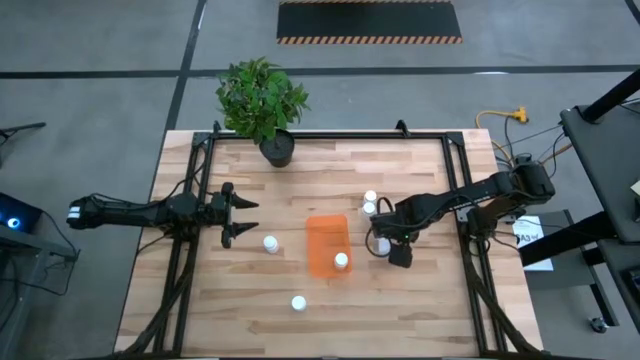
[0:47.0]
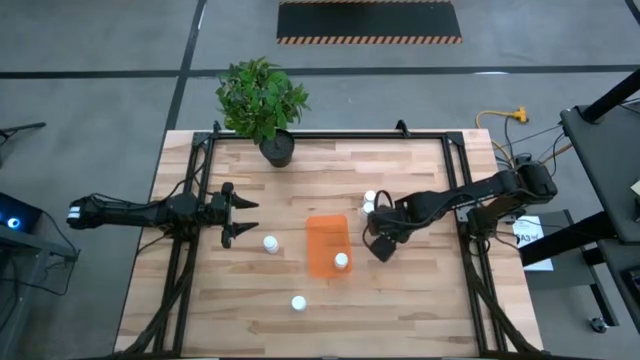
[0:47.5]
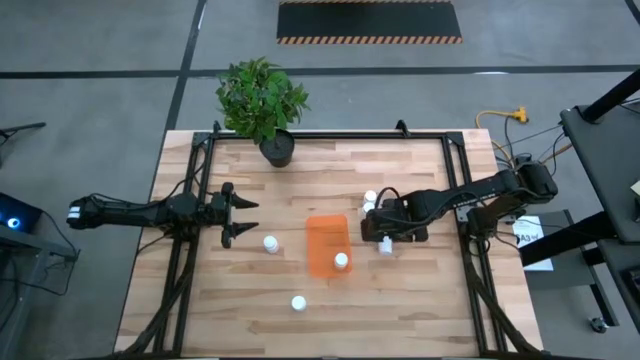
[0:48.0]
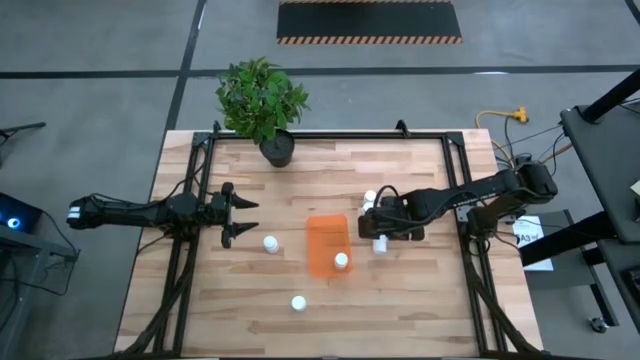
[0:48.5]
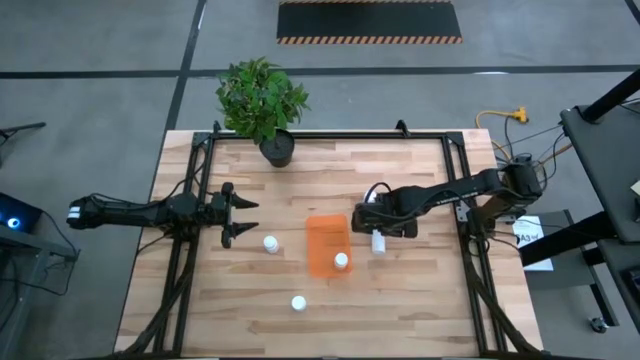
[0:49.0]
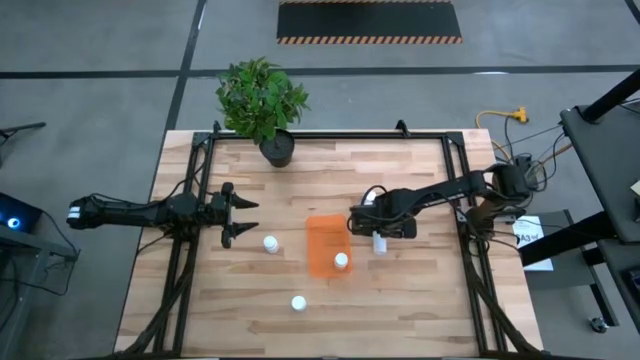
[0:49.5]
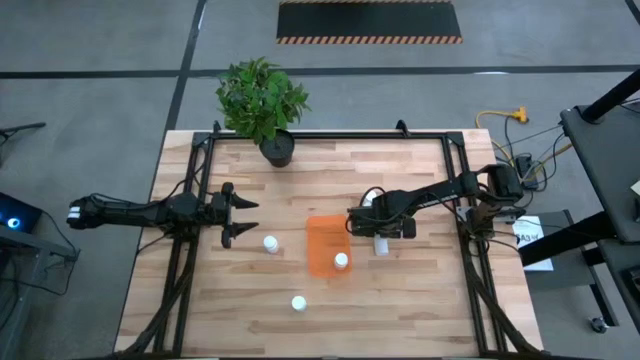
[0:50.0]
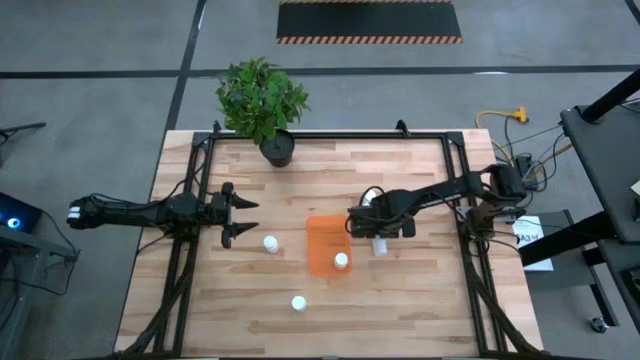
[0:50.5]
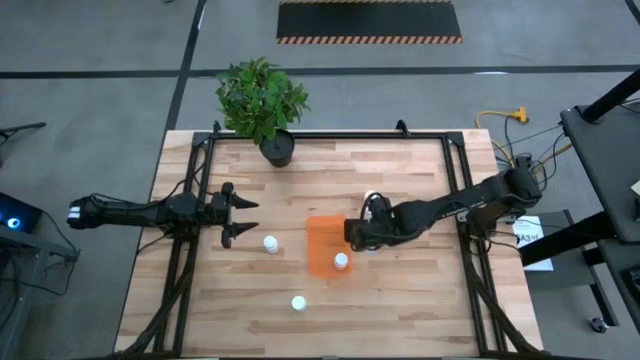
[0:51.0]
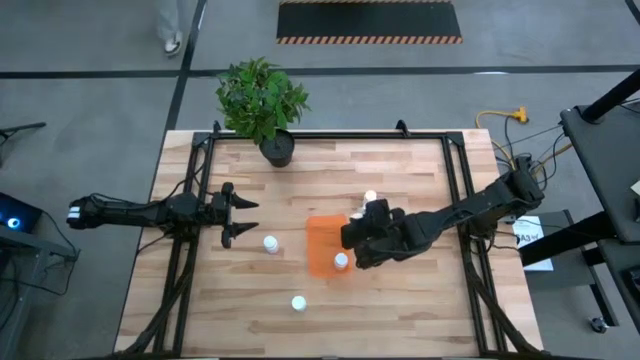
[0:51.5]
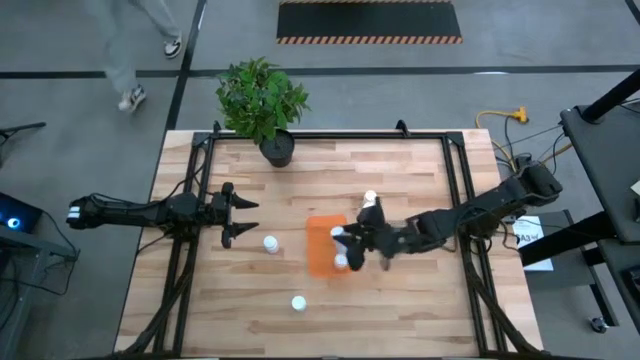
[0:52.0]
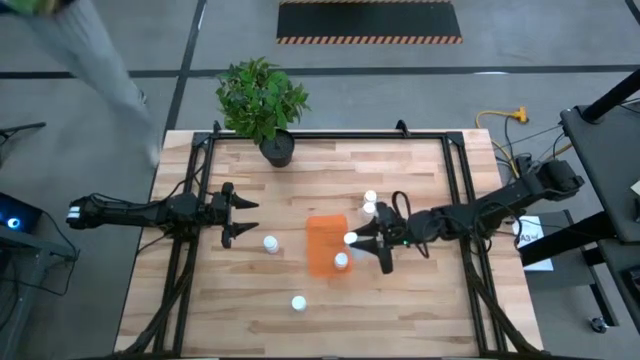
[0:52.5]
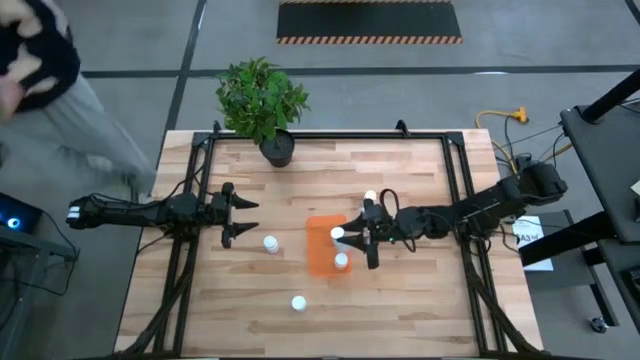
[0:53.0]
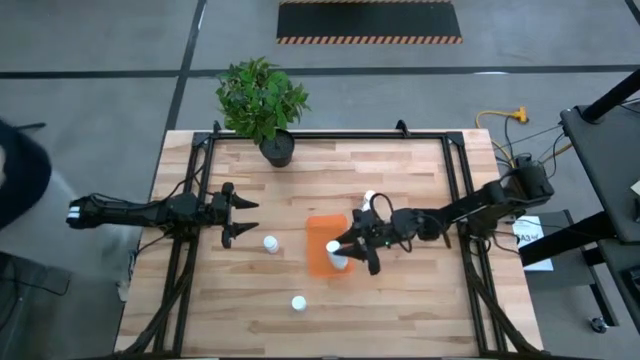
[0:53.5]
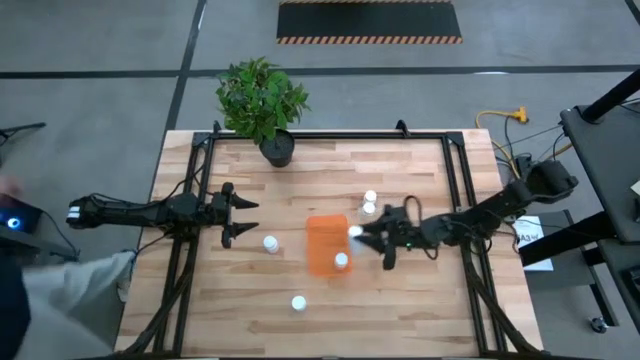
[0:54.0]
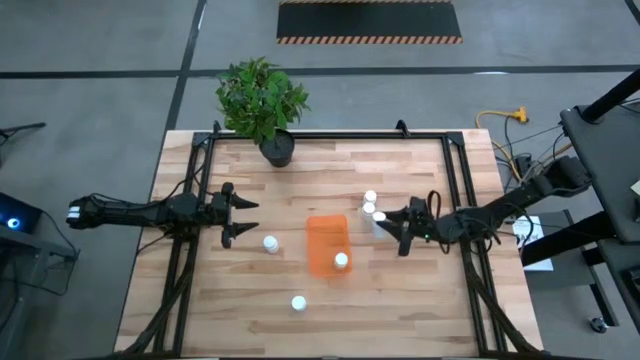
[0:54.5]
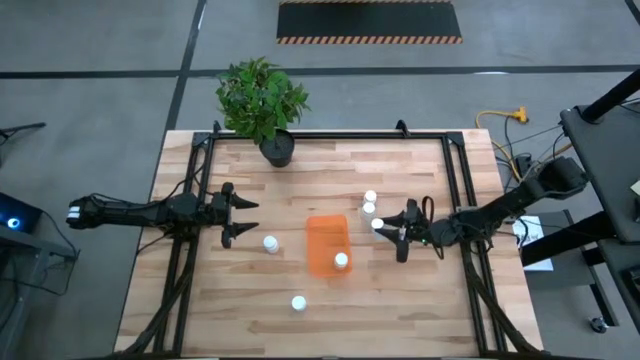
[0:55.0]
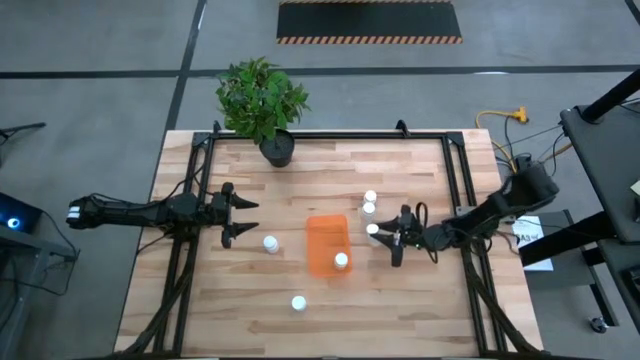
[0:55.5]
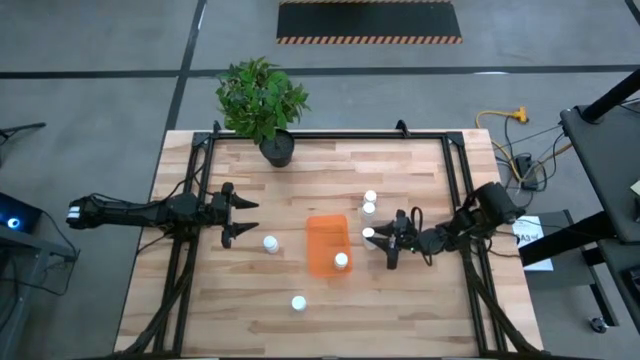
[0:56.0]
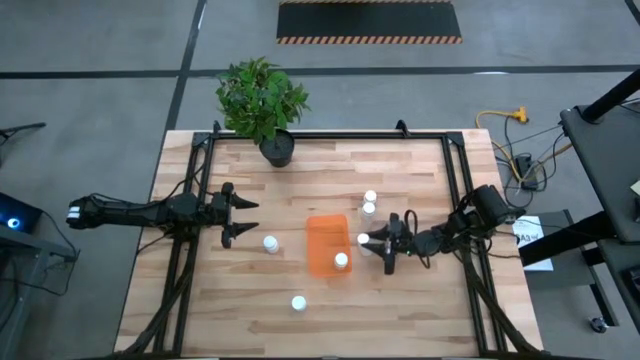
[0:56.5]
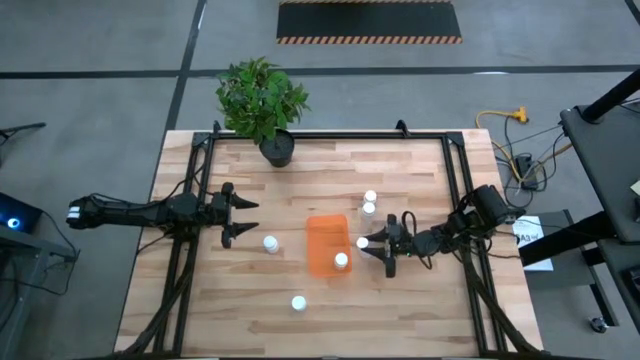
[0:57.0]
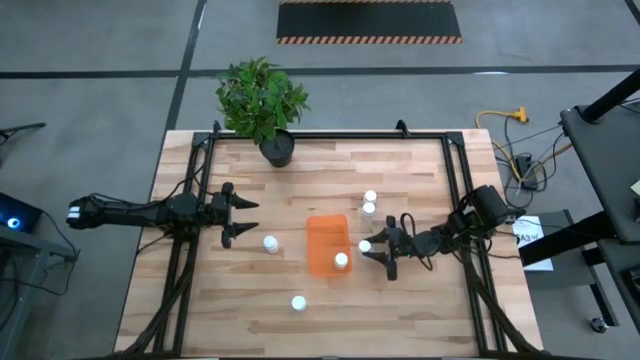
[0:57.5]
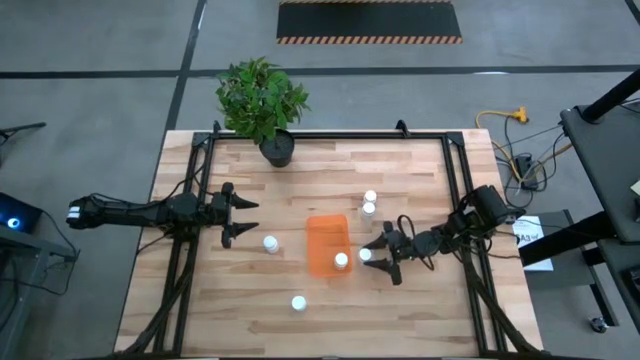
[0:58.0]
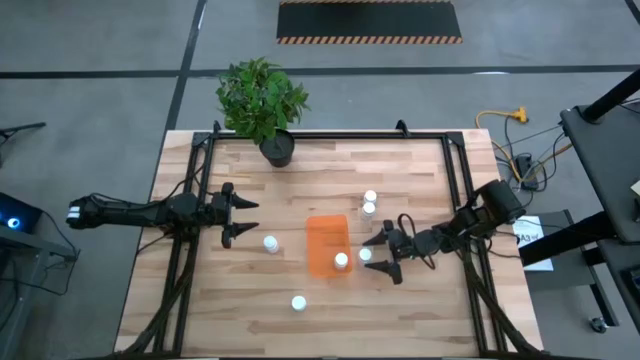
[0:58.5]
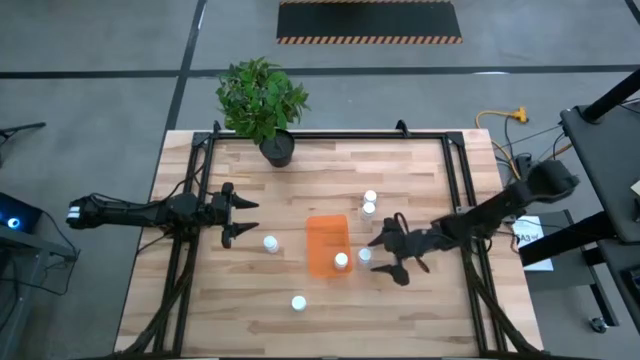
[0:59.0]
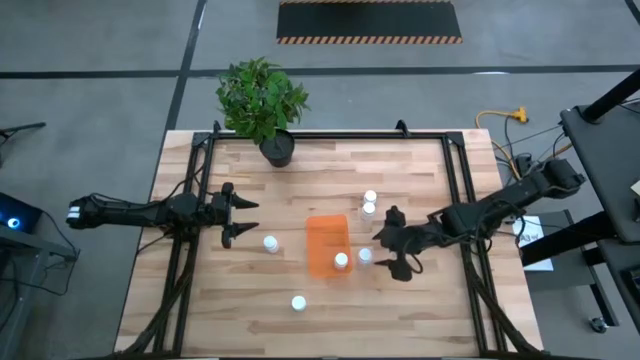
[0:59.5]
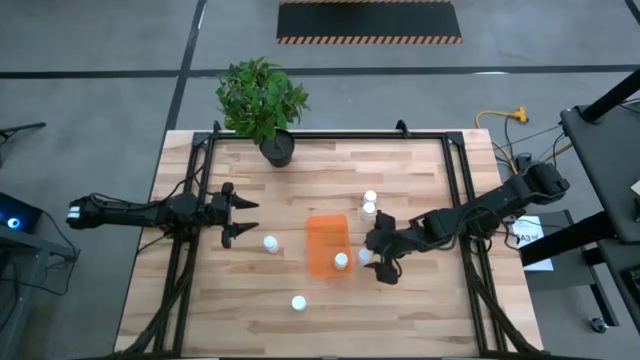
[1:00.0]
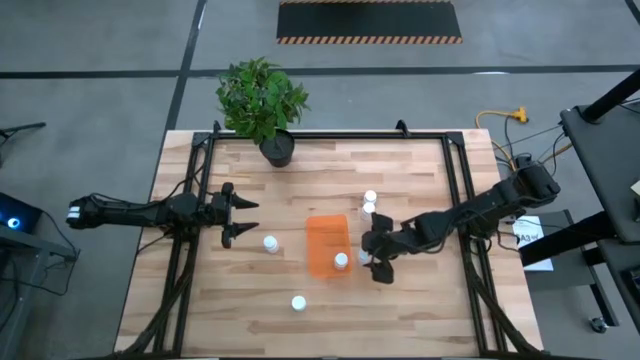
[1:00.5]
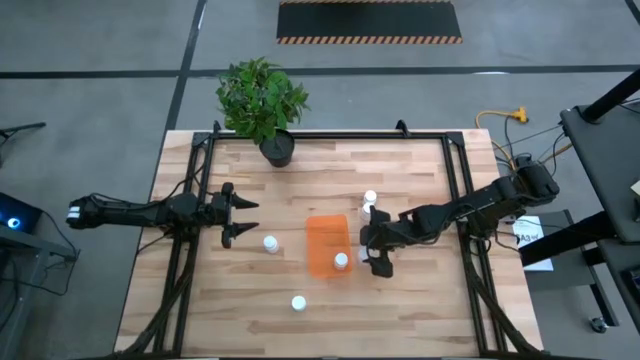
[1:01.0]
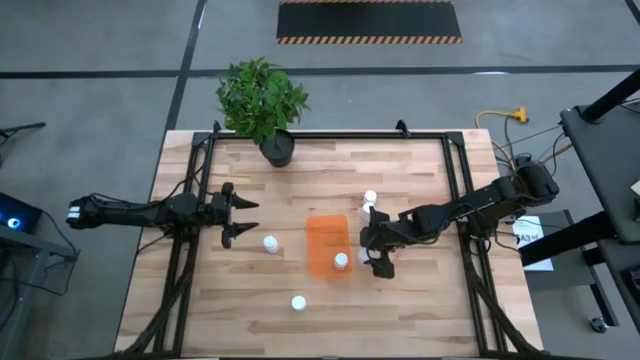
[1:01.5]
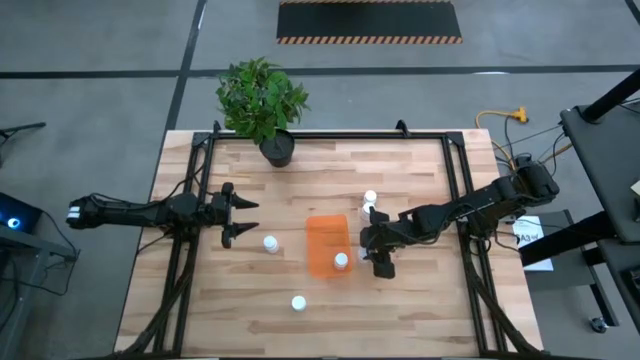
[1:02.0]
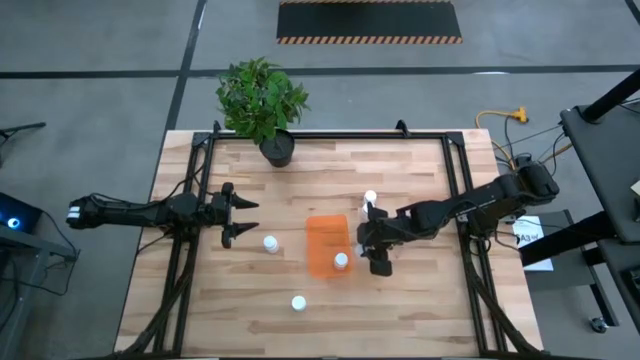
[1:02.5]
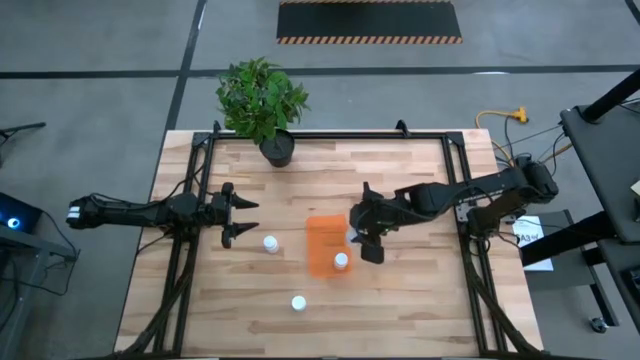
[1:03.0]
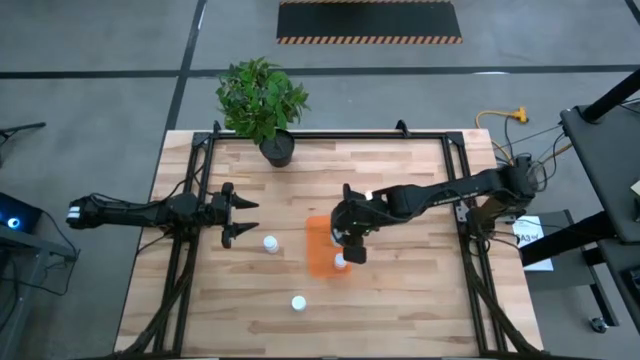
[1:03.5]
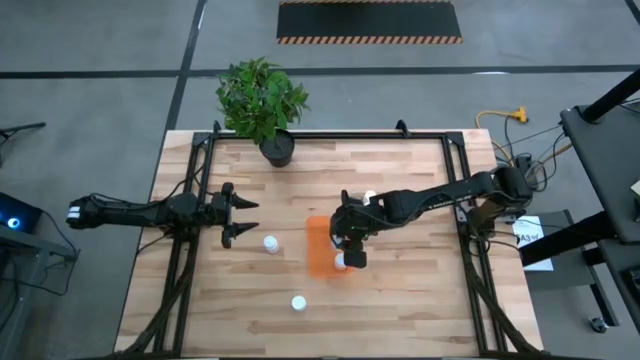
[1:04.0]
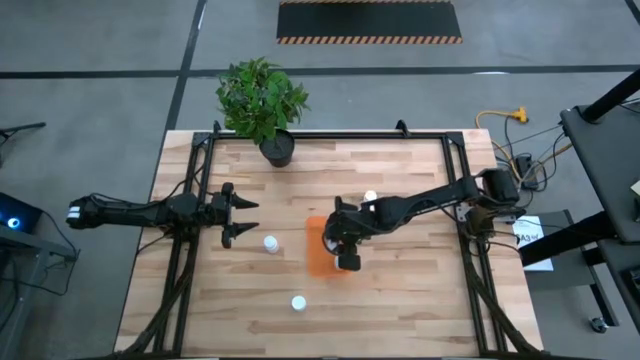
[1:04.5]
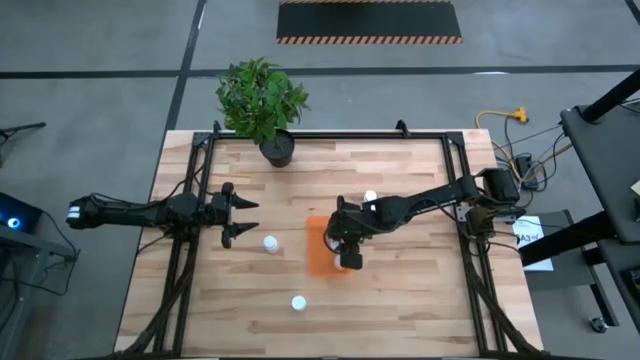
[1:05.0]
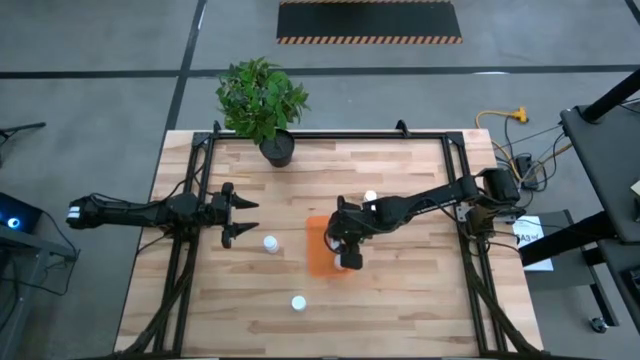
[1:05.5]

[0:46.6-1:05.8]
Task: Pick and place pill bottles into a basket
Put the white pill bottle into the orange container

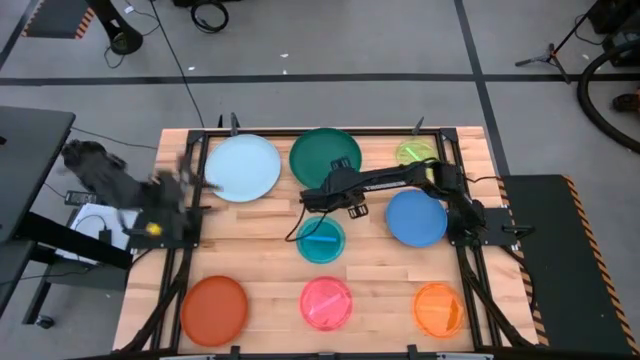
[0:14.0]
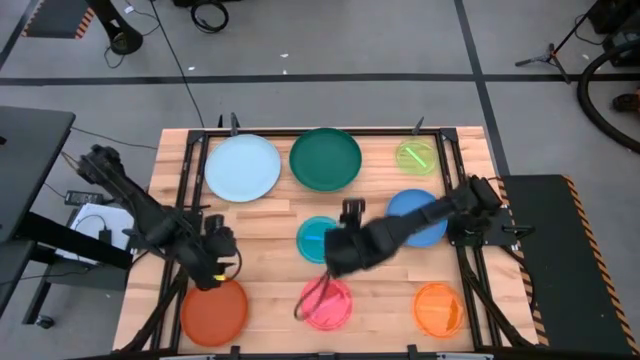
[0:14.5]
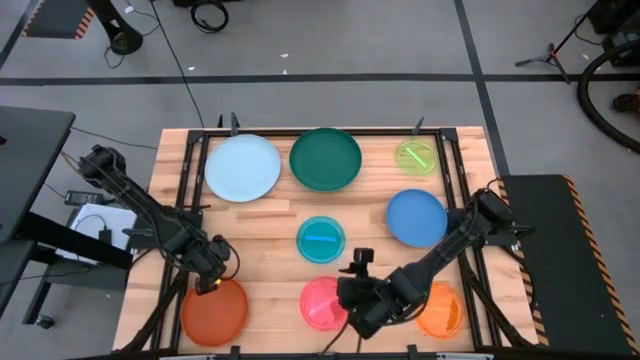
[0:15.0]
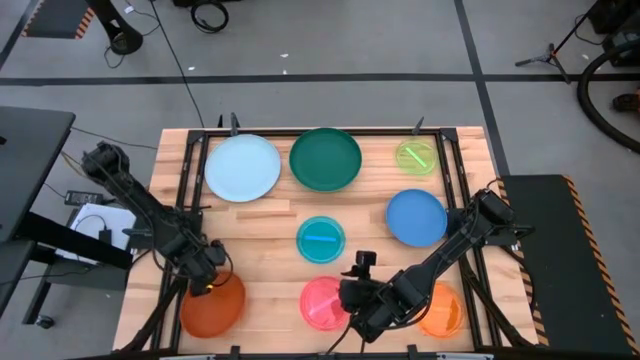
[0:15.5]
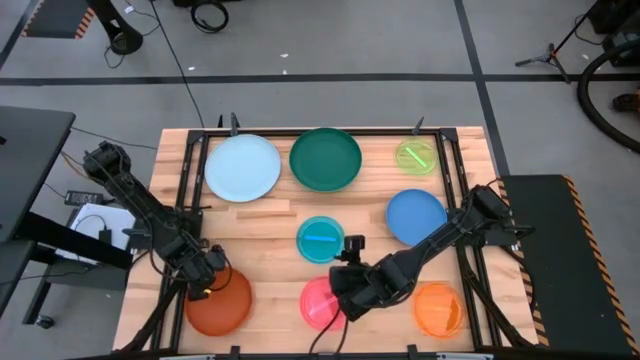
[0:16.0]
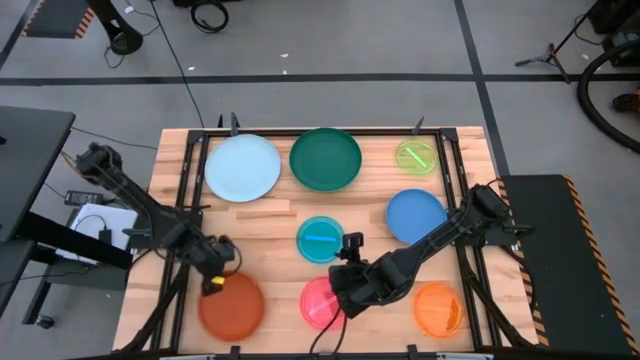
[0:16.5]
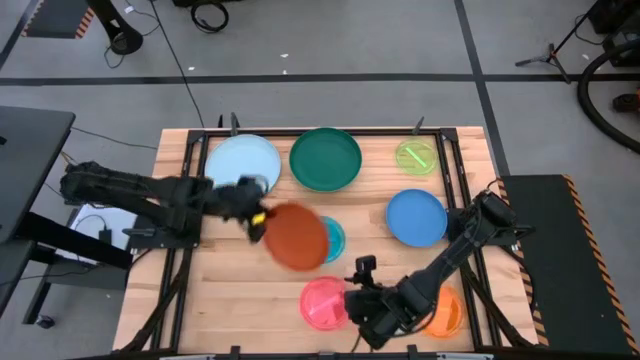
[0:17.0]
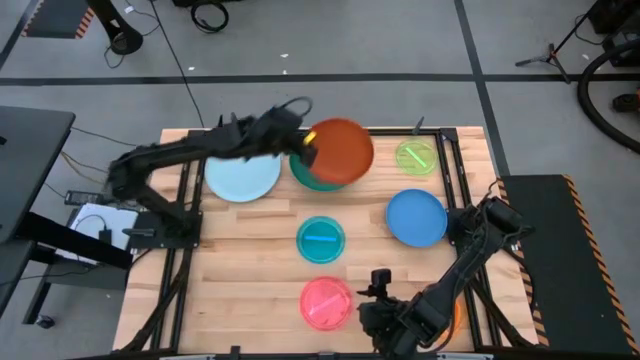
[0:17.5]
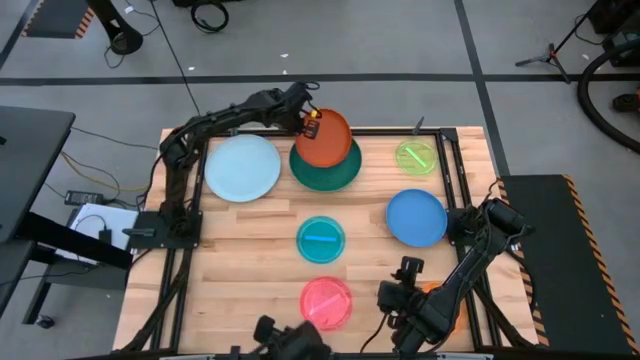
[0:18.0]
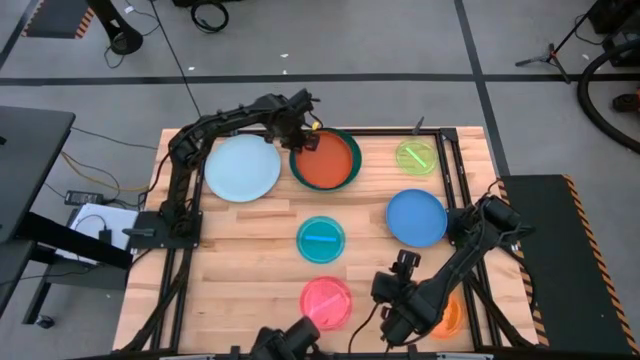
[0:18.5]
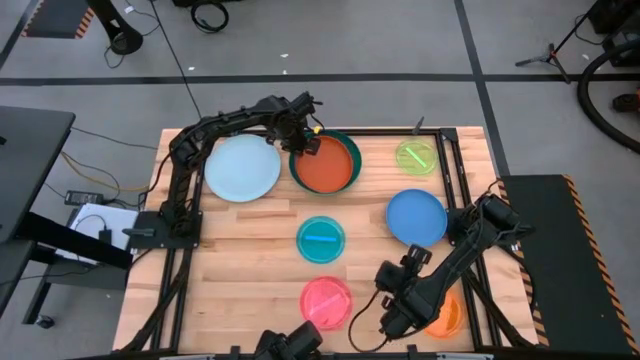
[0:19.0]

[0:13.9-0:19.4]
Task: Stack plastic plates
Stack the orange plate on top of the dark green plate
